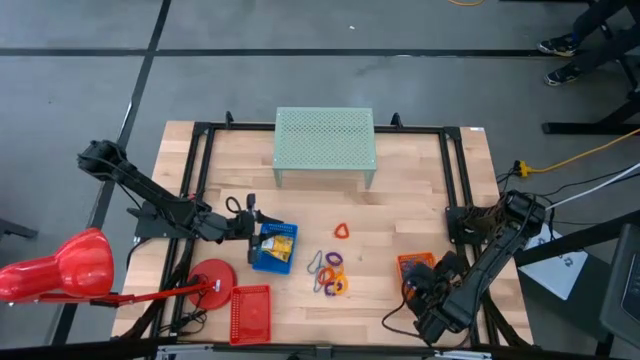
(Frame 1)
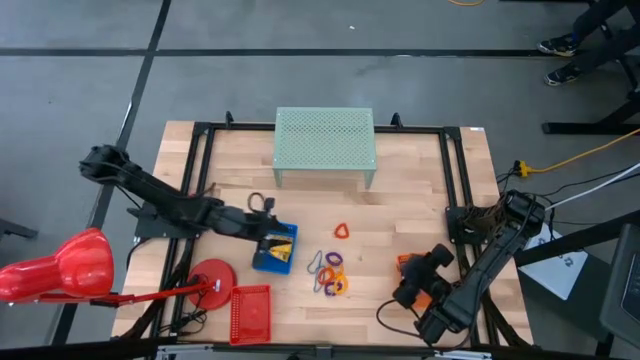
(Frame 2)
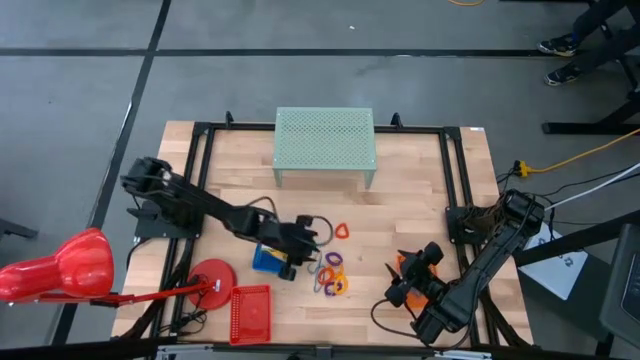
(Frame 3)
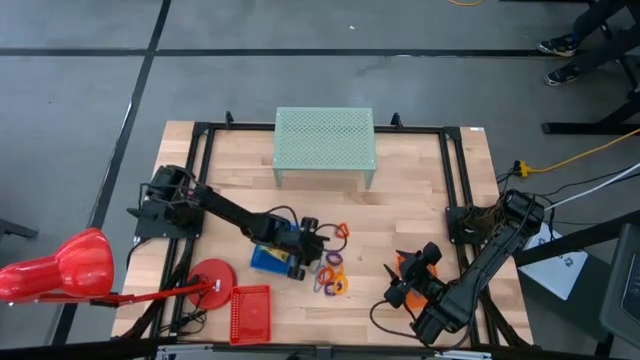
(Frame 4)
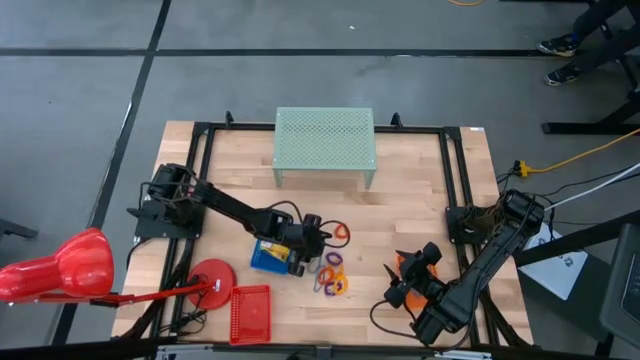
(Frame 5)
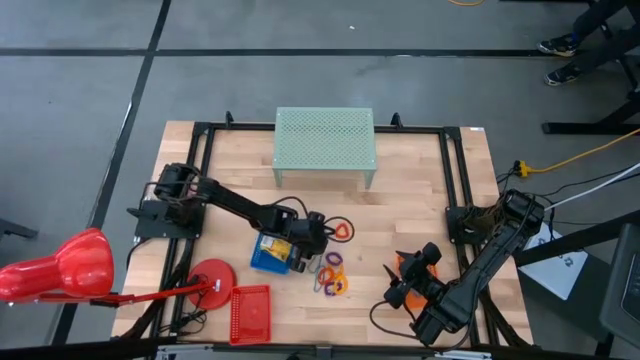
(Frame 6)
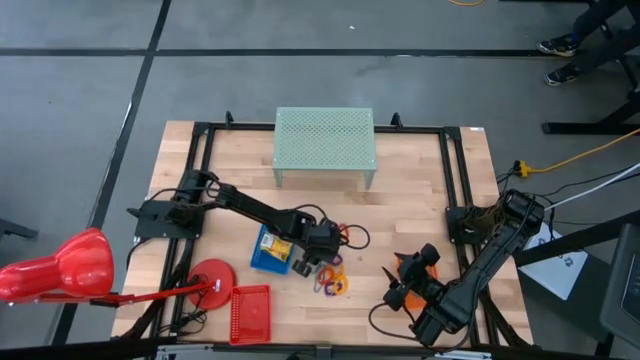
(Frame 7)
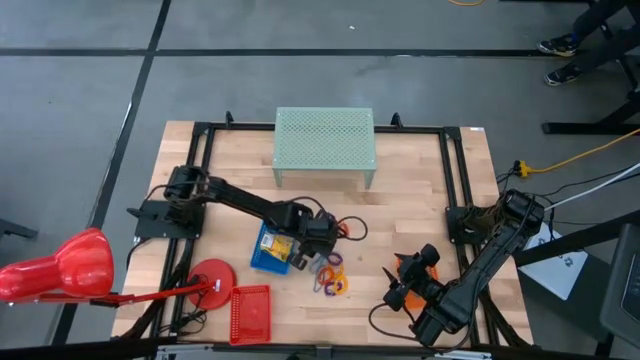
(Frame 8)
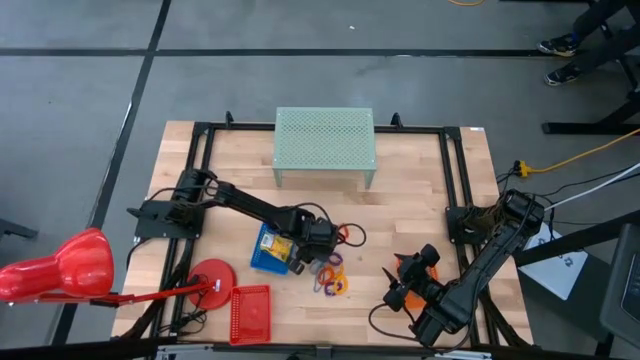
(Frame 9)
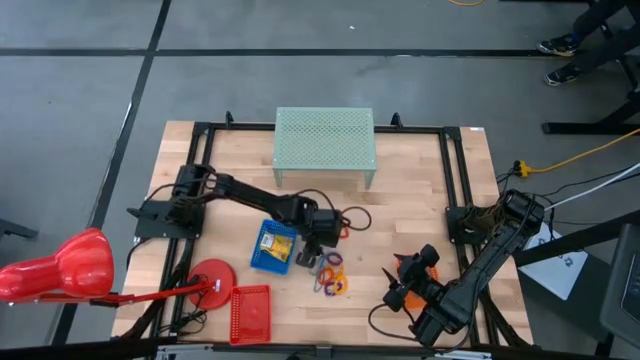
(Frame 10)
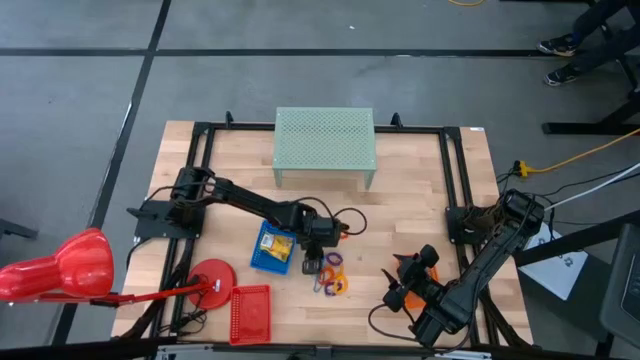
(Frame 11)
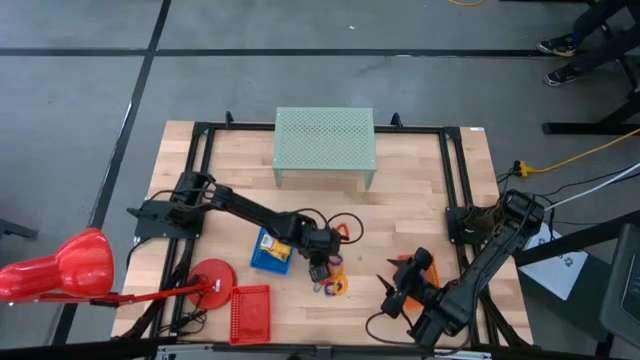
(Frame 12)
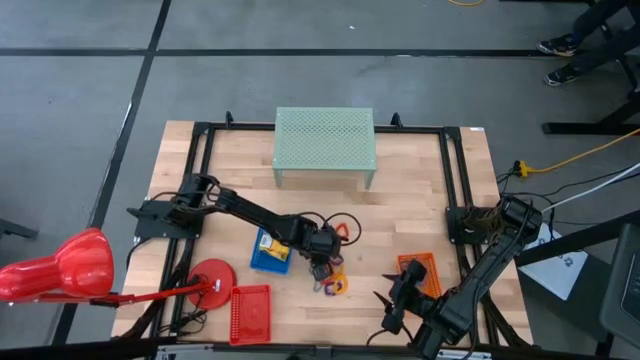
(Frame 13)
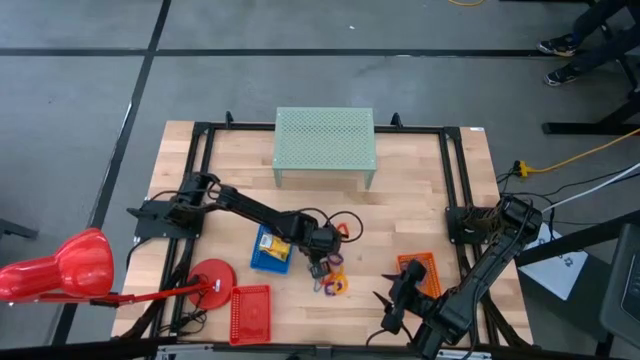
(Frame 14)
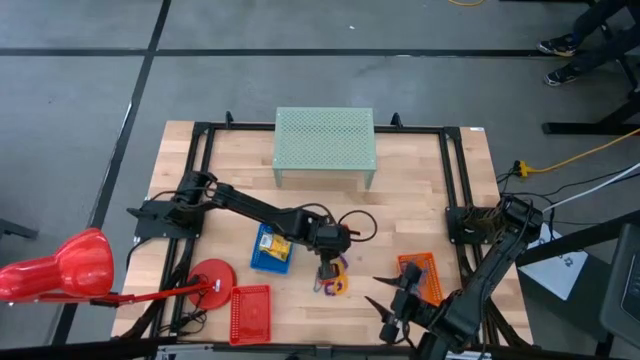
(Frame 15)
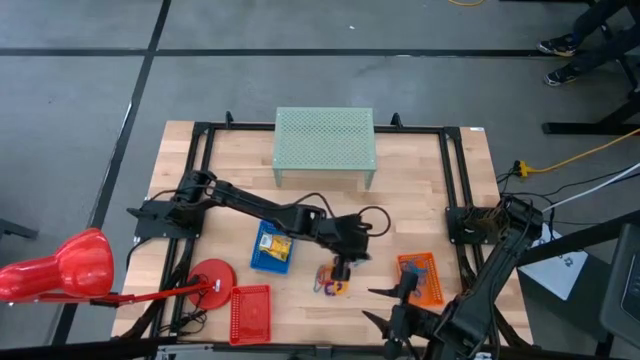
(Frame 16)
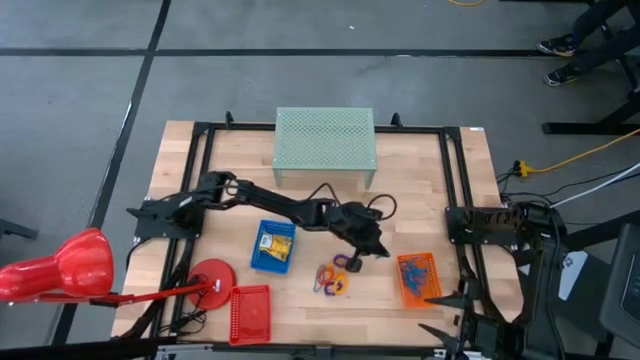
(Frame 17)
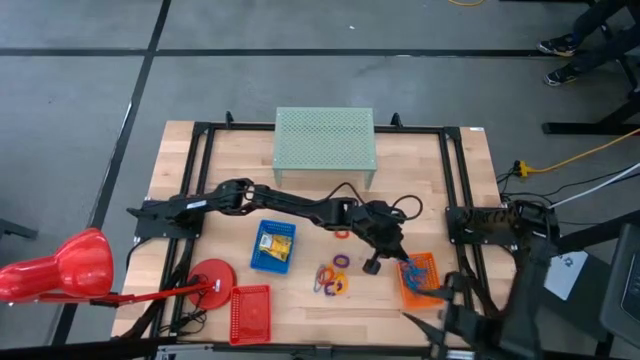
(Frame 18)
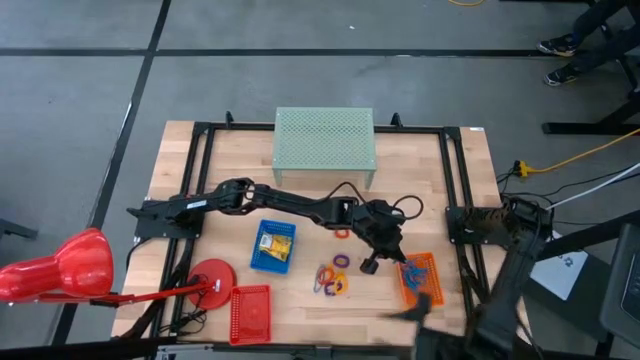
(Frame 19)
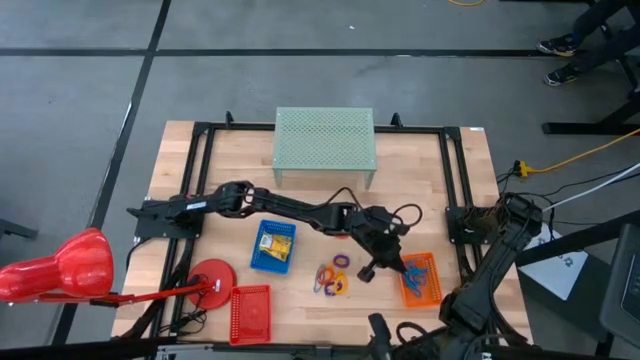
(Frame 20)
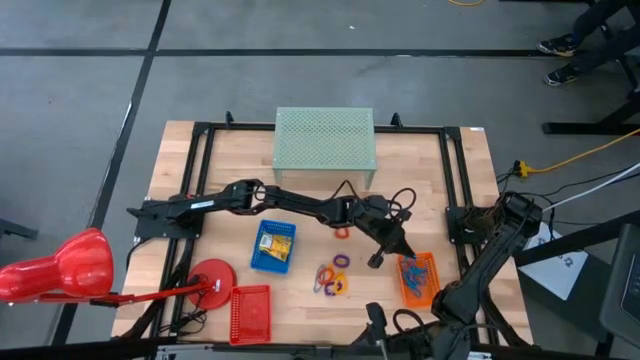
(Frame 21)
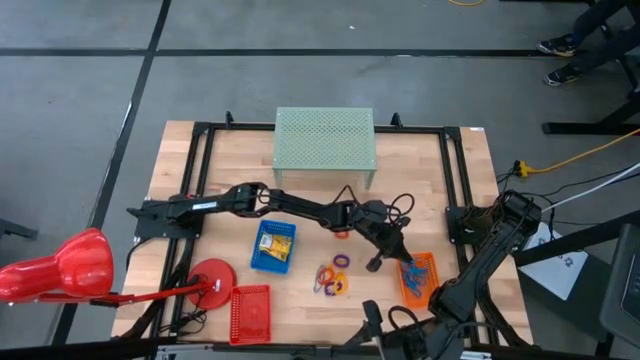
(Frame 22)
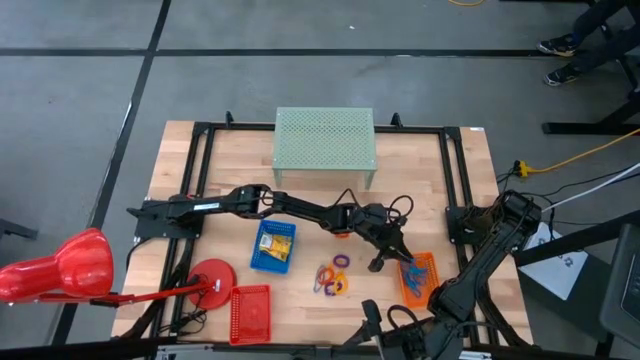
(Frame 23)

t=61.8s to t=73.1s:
Task: Pick & Place Office Desk Supplies
Put the blue rubber band into the orange bin

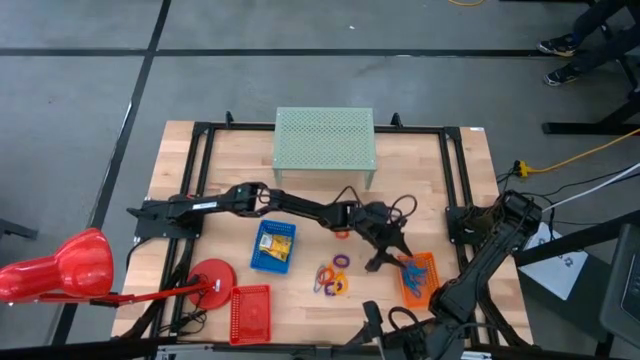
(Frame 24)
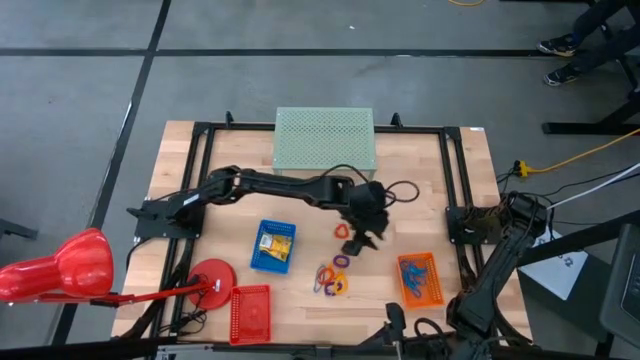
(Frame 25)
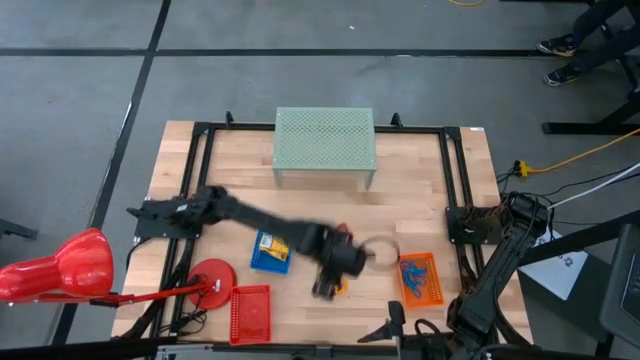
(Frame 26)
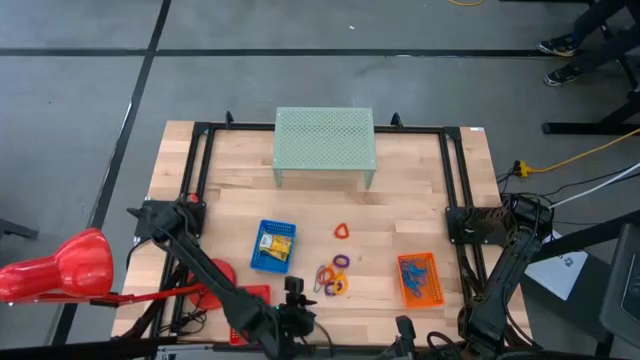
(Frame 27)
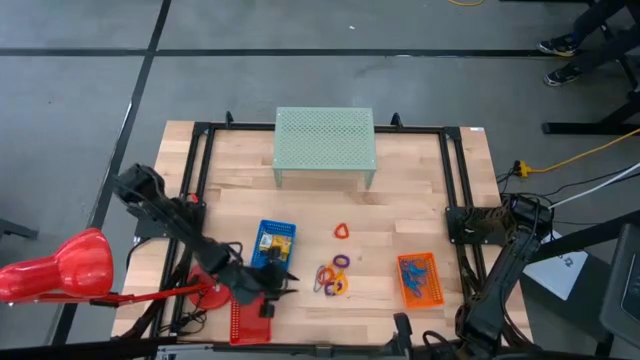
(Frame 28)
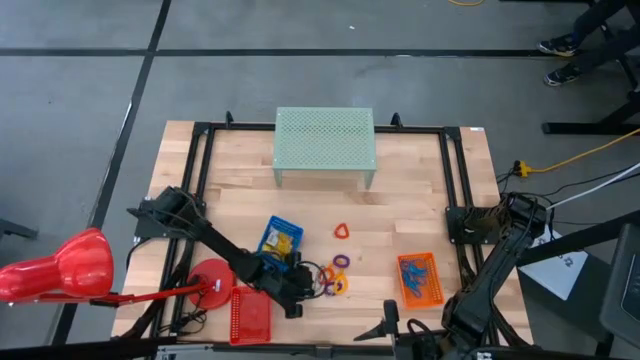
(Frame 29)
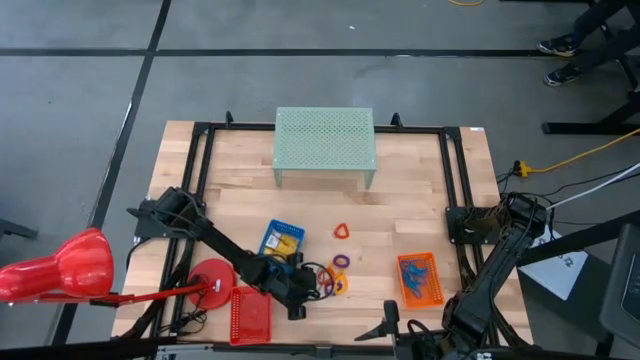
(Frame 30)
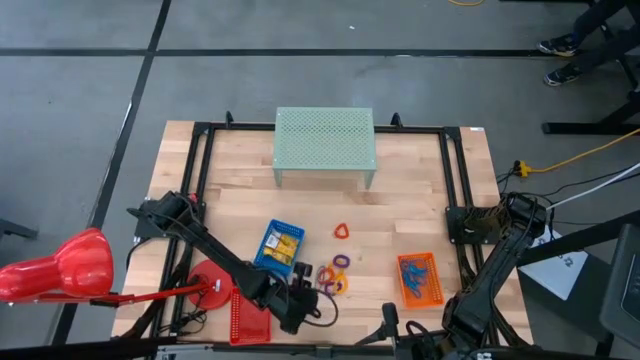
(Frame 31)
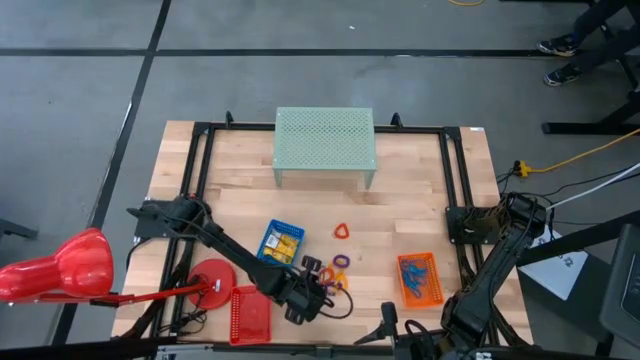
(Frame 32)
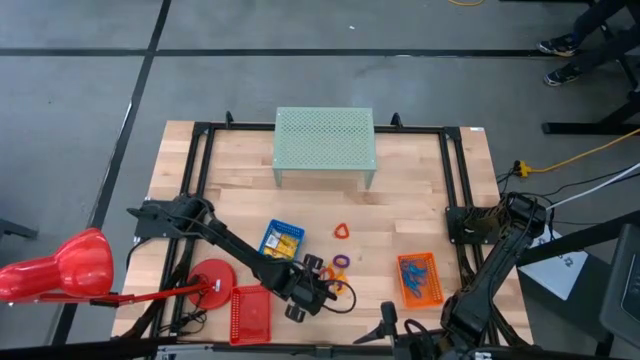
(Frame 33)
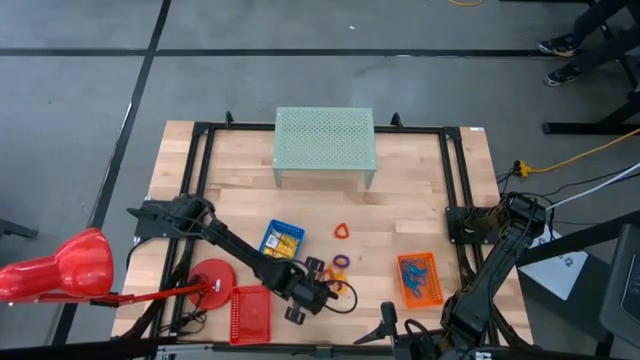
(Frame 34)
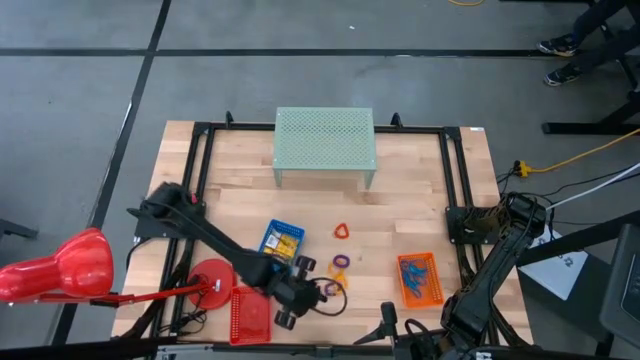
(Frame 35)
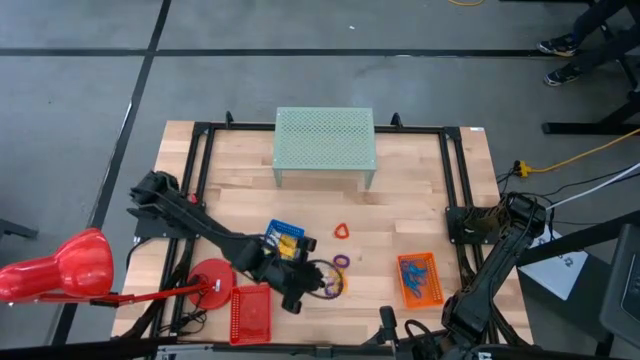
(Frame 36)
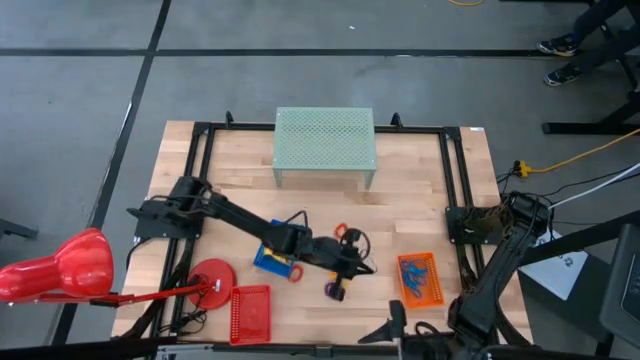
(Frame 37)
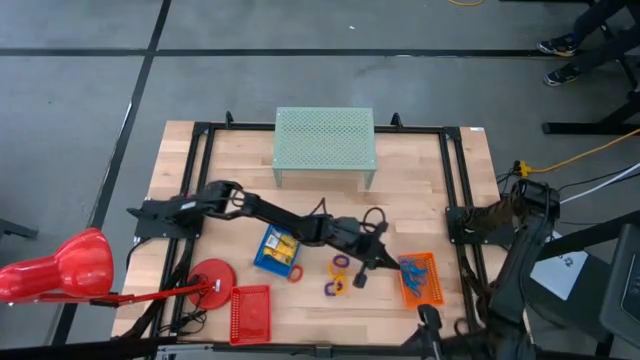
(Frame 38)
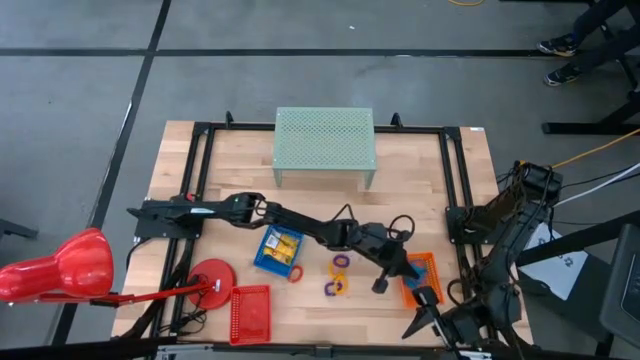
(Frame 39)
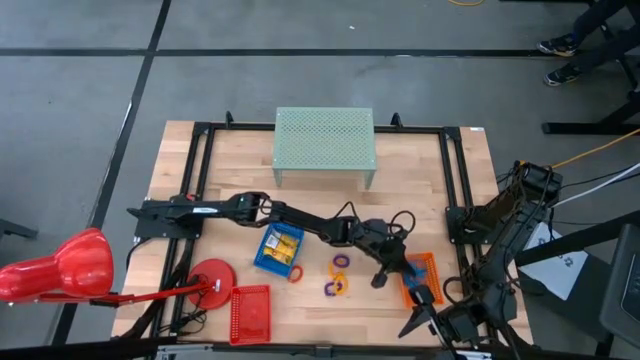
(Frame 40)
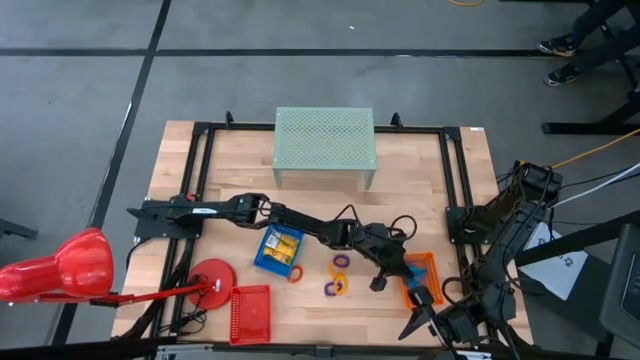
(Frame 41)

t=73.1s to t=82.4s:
Put the blue rubber band into the orange bin

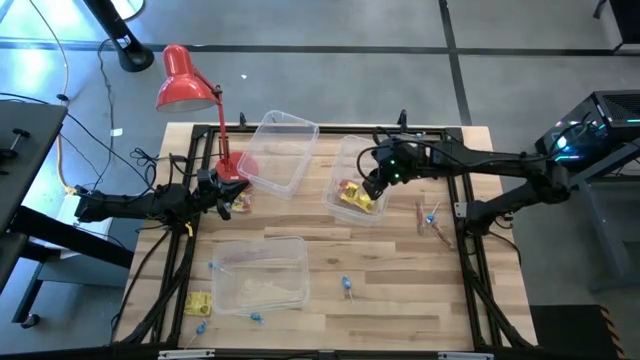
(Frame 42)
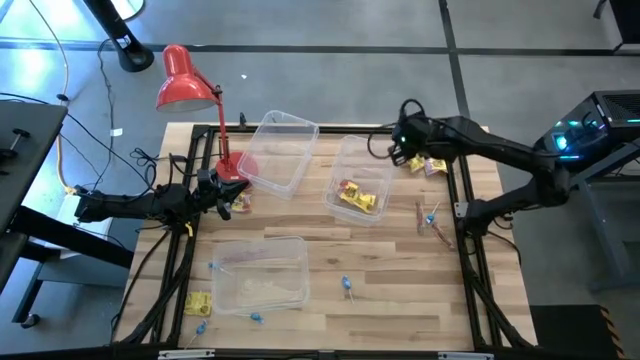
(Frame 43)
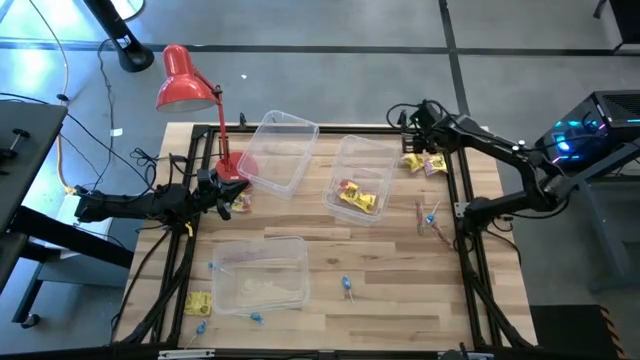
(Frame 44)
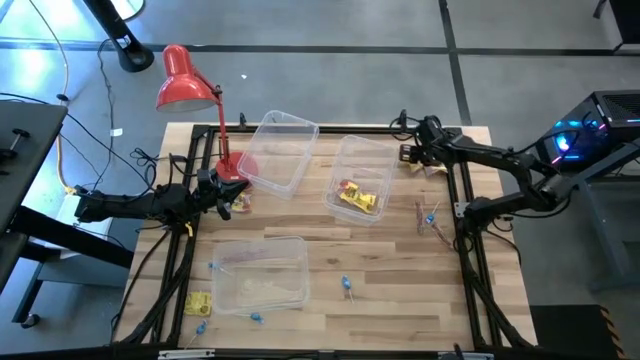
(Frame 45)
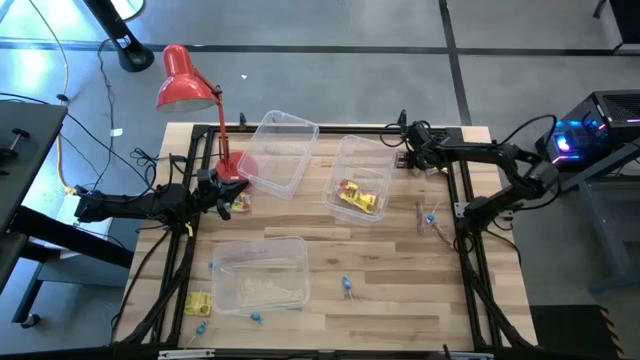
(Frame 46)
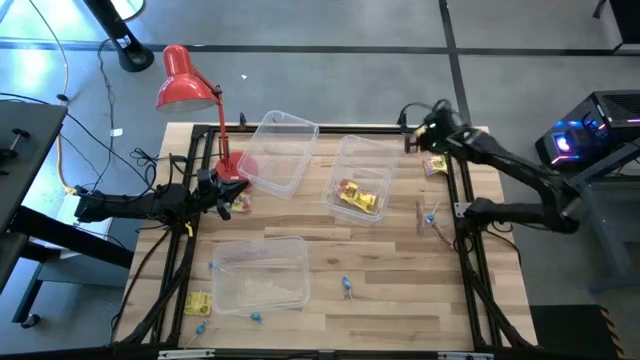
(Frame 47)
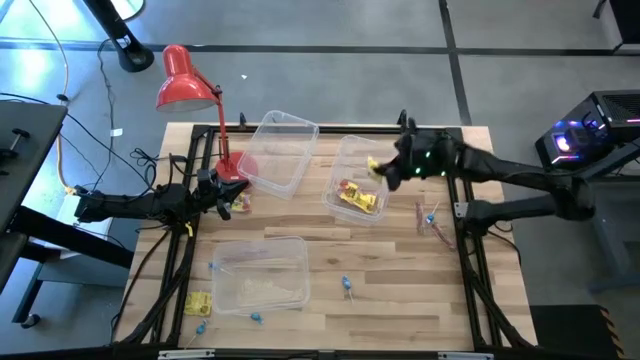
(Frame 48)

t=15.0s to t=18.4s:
Task: Sort candy
Put the yellow candy into the top right transparent bin
